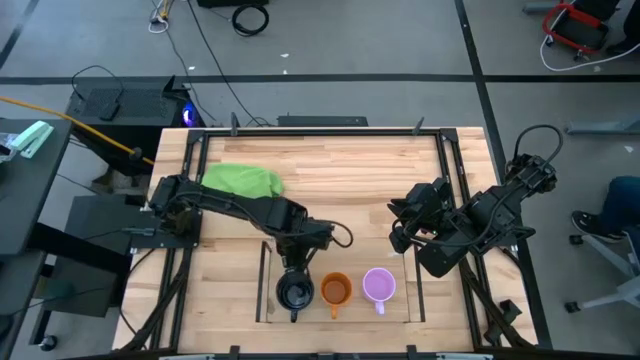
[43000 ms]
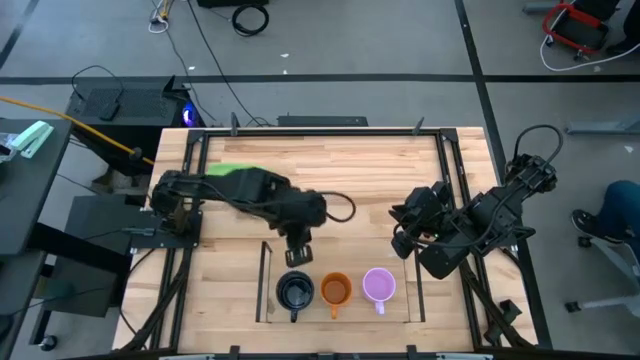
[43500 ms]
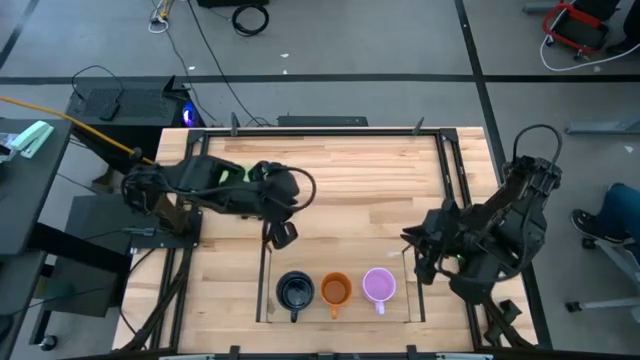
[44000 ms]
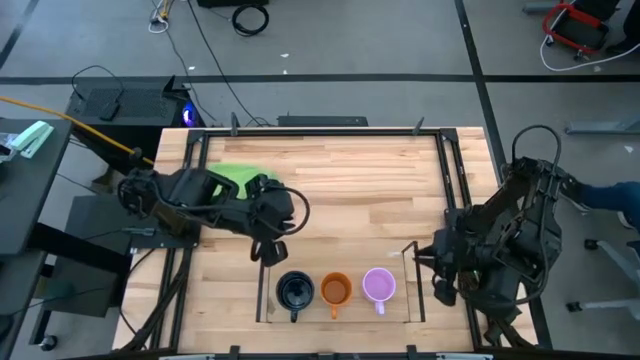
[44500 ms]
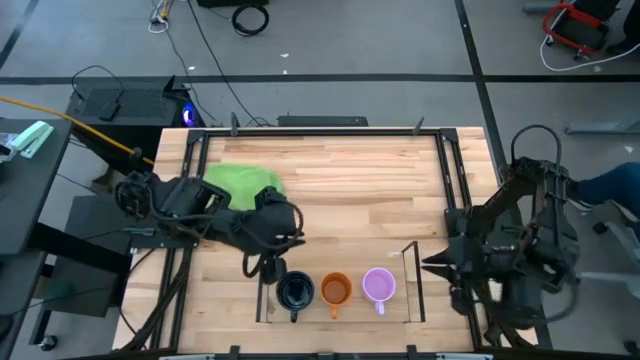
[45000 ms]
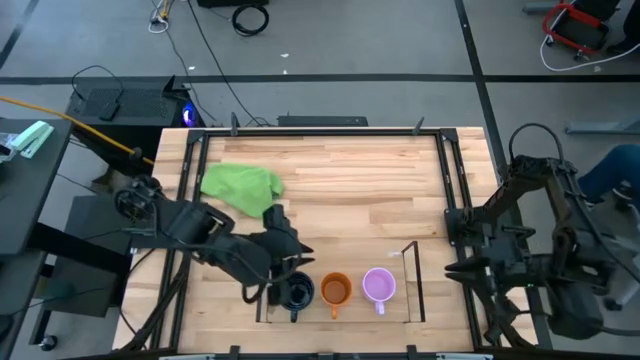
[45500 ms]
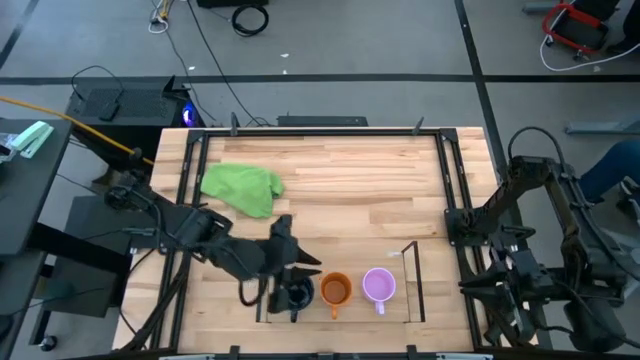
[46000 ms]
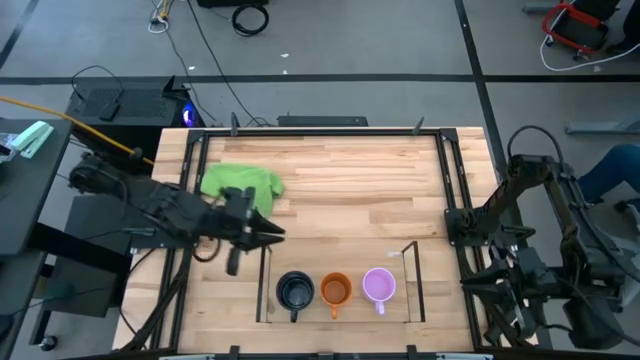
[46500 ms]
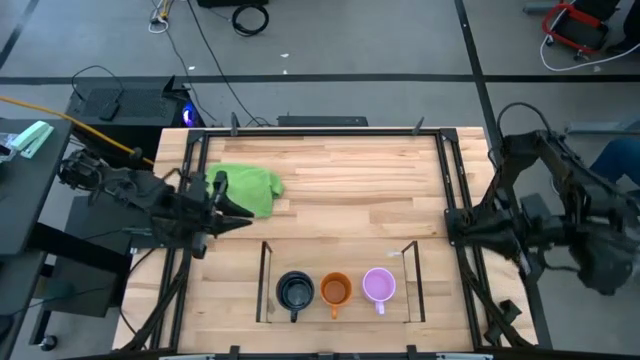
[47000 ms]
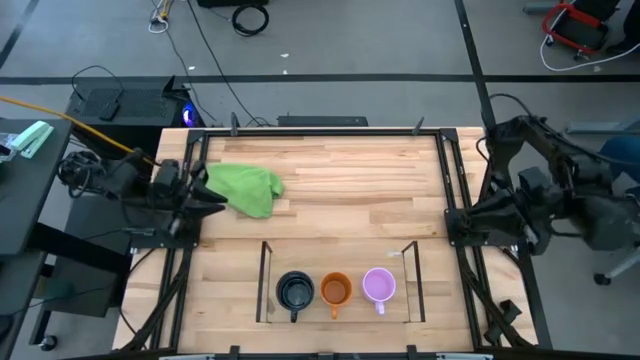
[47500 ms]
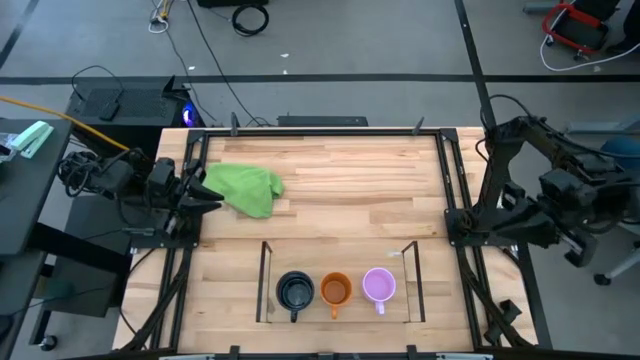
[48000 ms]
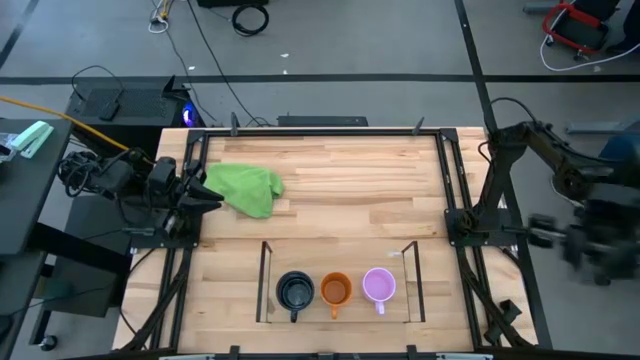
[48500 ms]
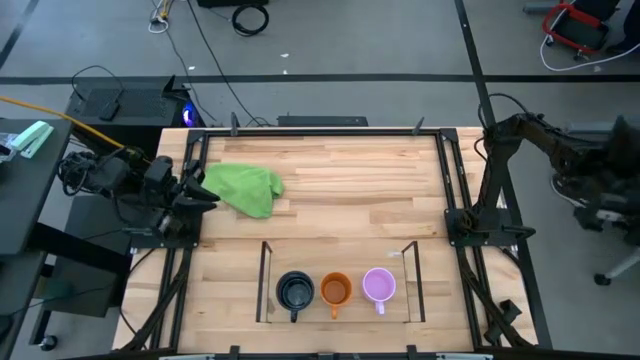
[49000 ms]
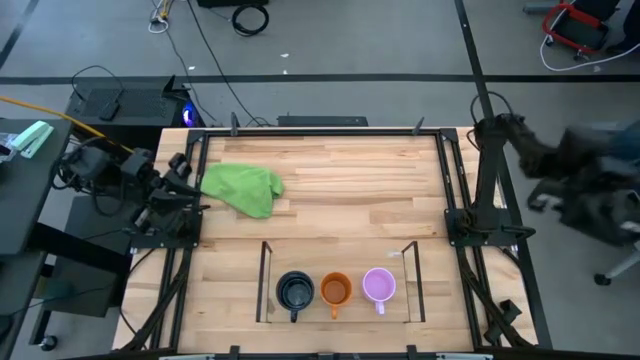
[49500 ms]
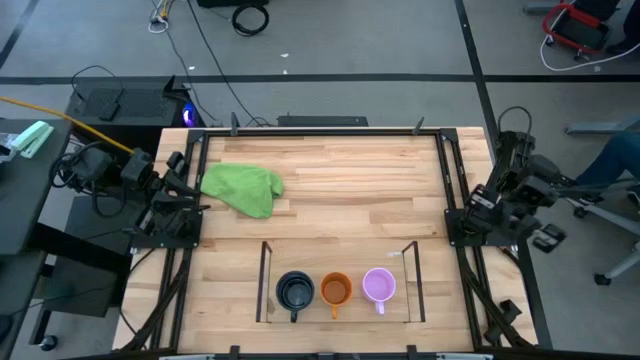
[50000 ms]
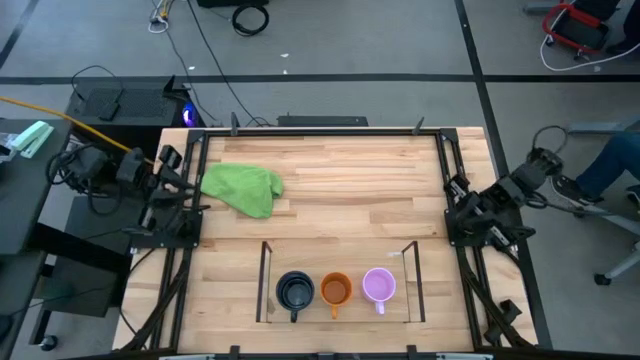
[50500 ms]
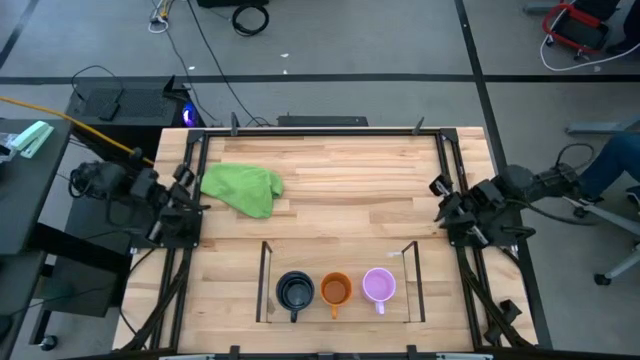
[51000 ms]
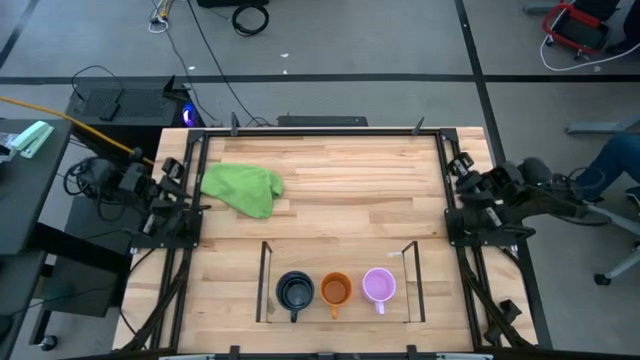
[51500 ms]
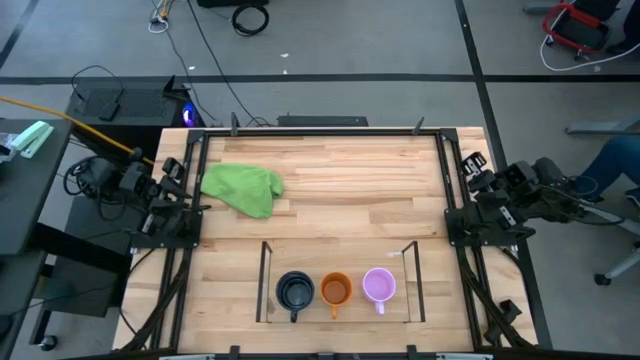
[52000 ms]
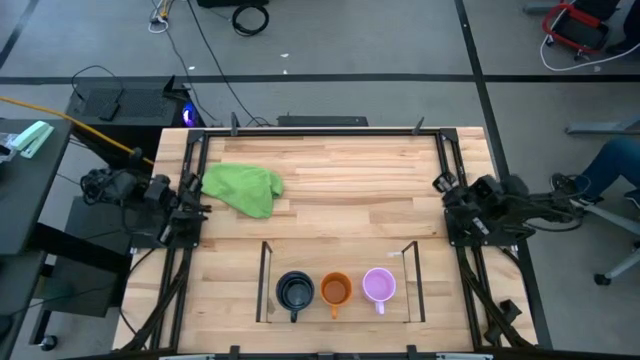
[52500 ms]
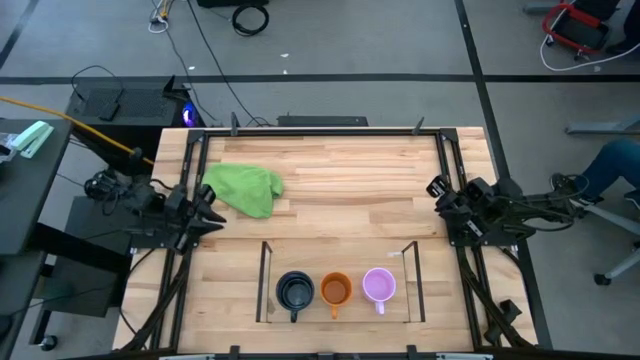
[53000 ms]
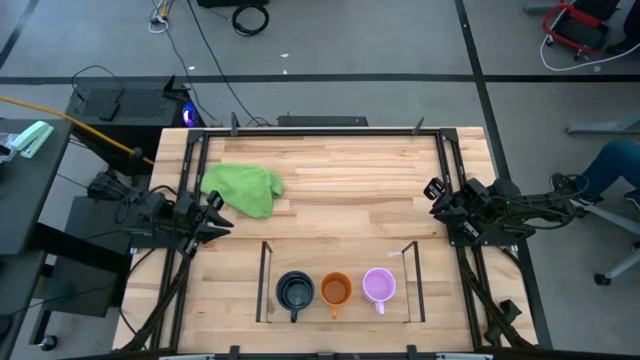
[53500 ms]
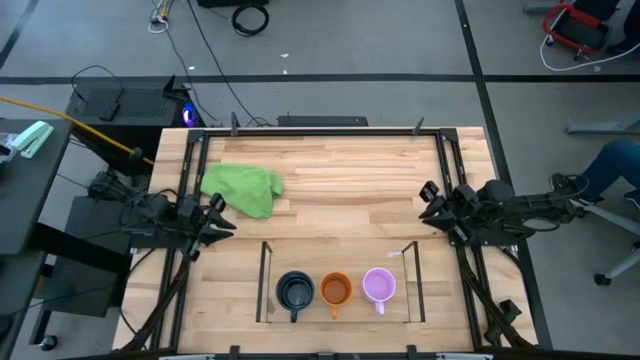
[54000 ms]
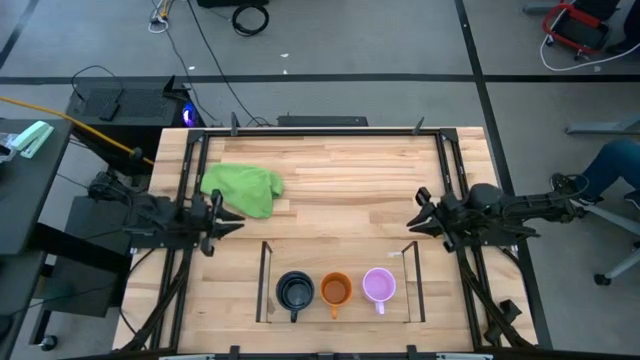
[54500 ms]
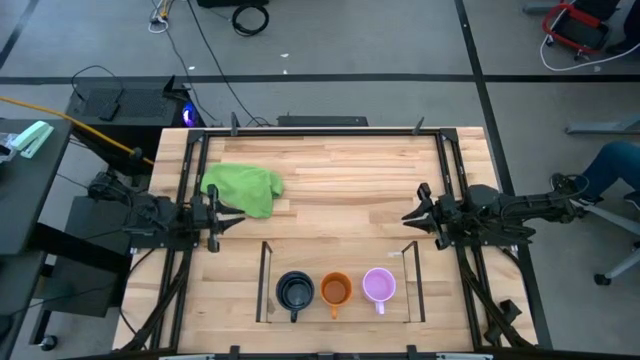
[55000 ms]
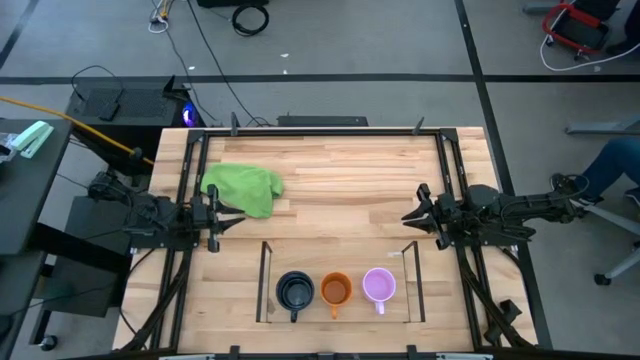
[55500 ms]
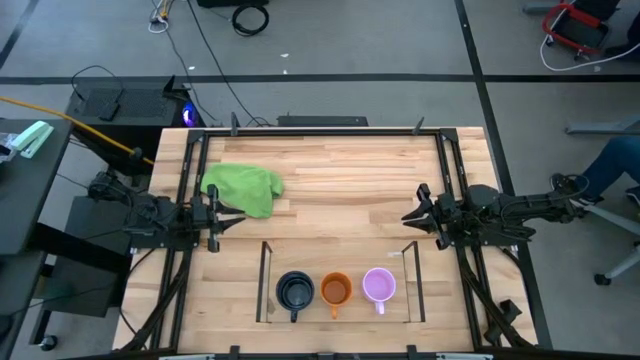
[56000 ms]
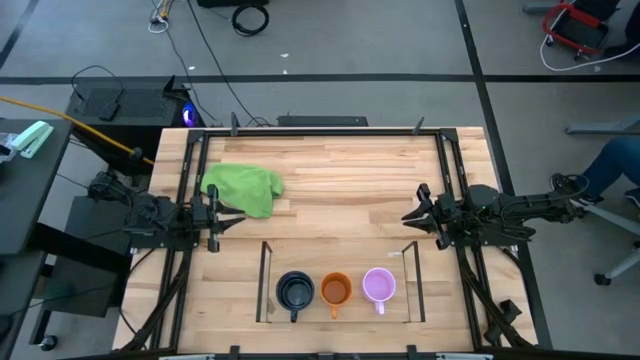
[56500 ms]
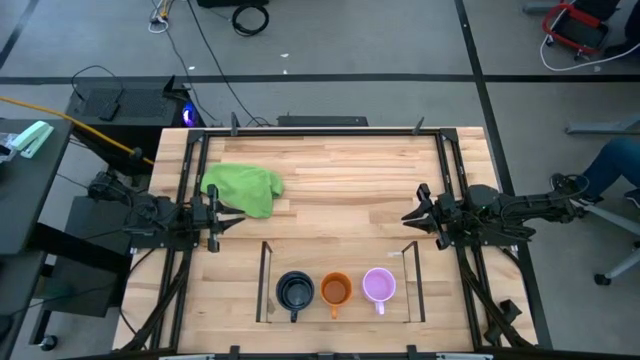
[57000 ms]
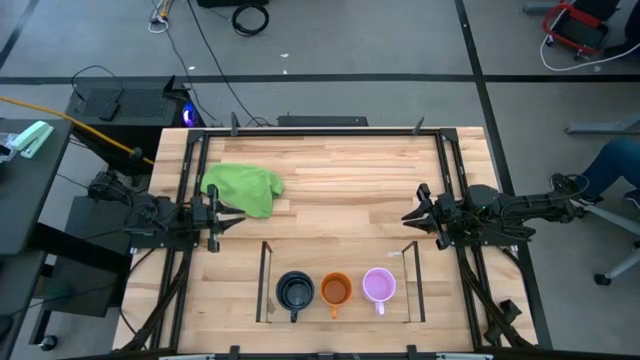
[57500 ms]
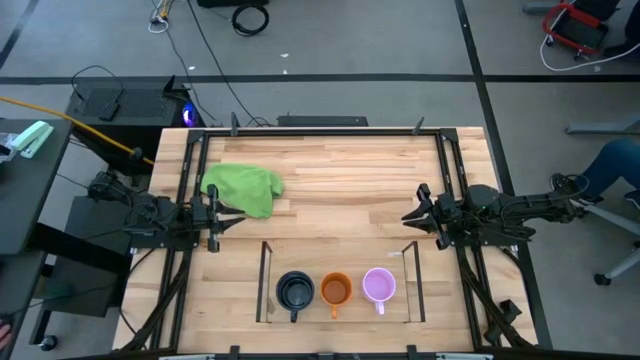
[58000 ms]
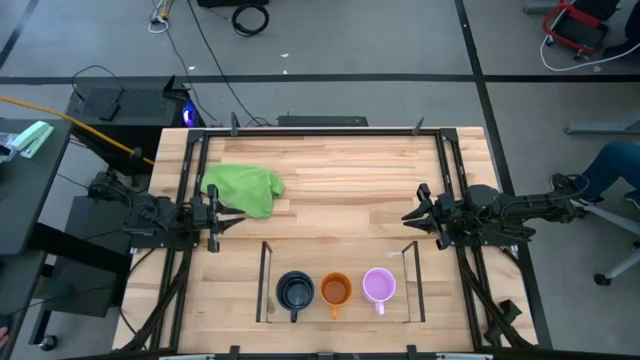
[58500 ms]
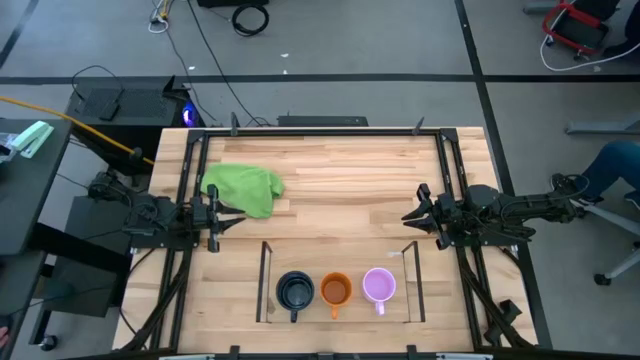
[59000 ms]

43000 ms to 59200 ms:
Task: Stack small to large cups/mugs on shelf
Return to Home Position

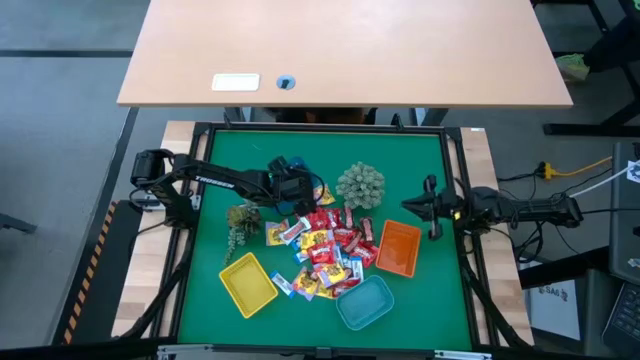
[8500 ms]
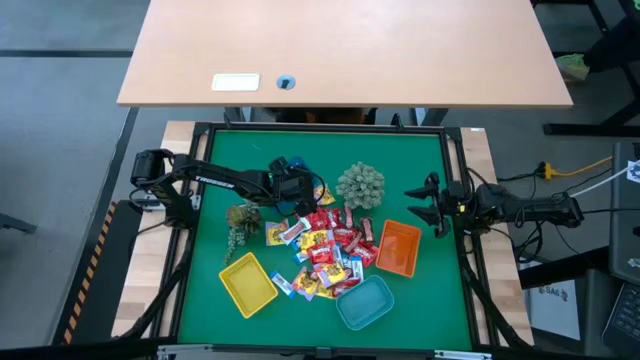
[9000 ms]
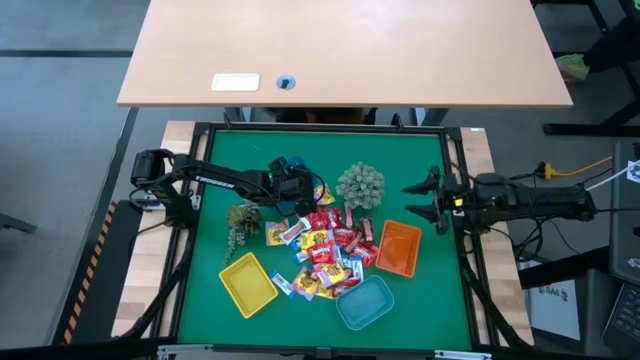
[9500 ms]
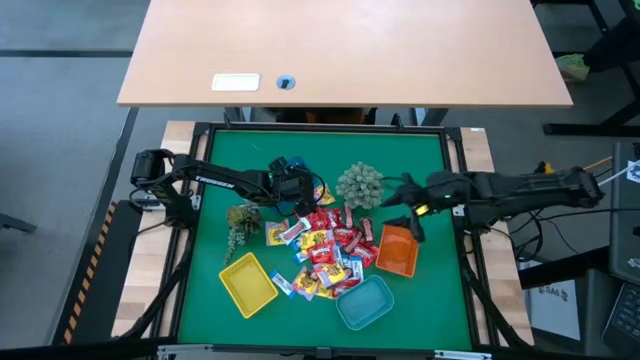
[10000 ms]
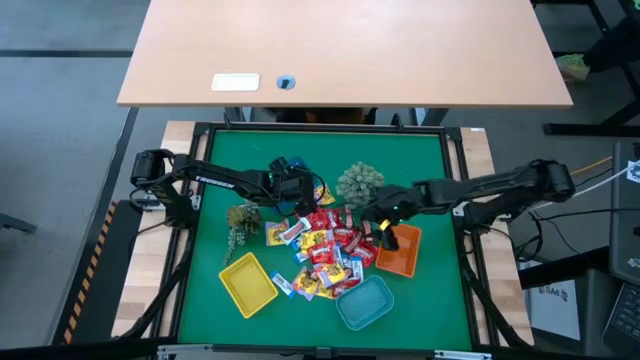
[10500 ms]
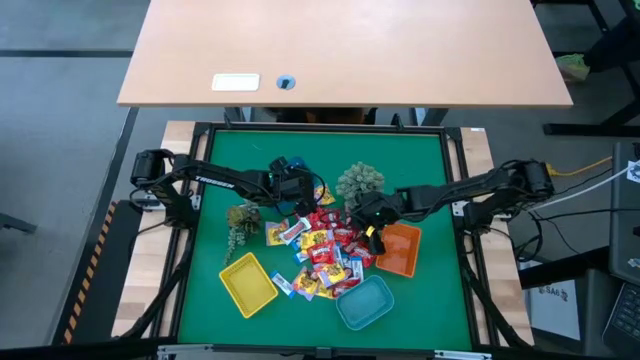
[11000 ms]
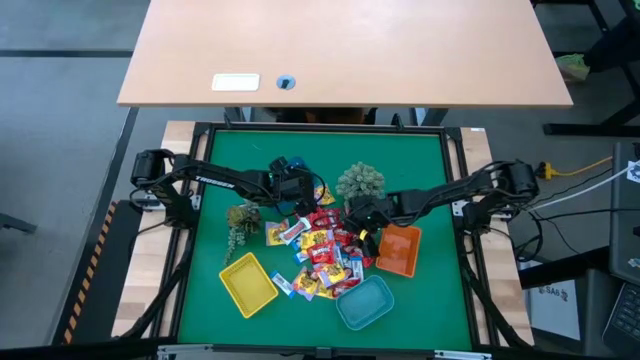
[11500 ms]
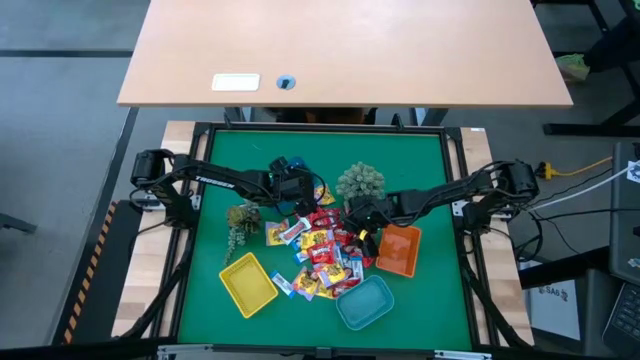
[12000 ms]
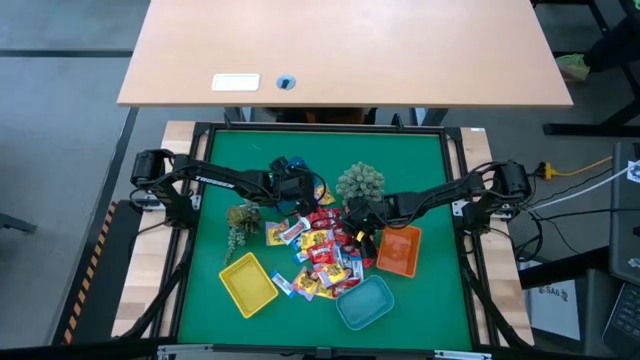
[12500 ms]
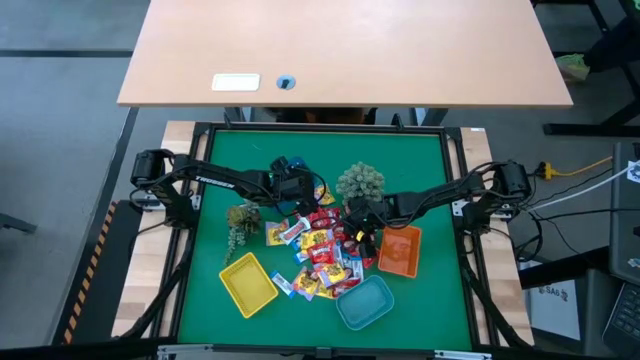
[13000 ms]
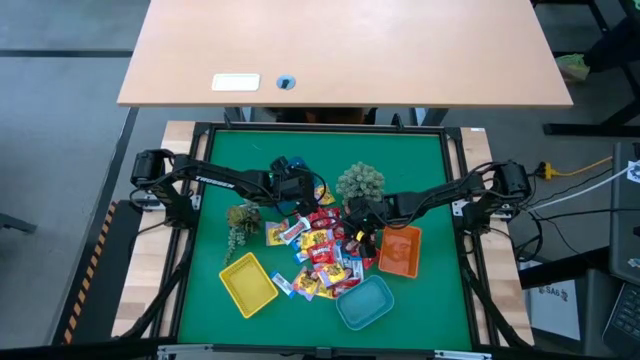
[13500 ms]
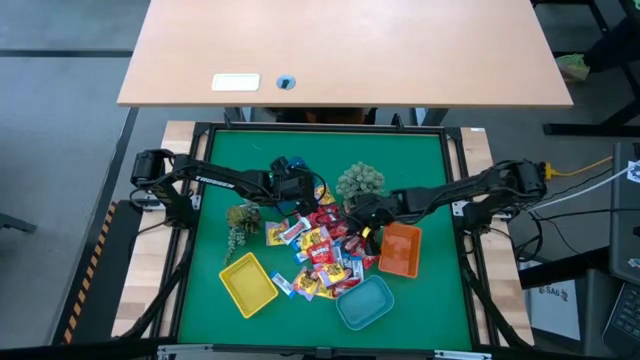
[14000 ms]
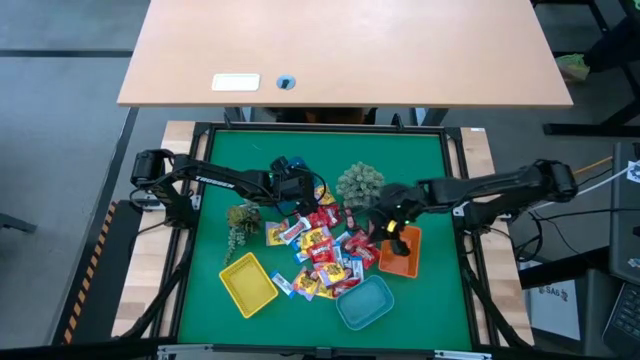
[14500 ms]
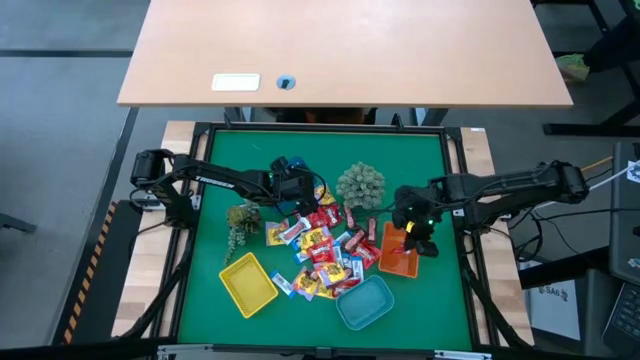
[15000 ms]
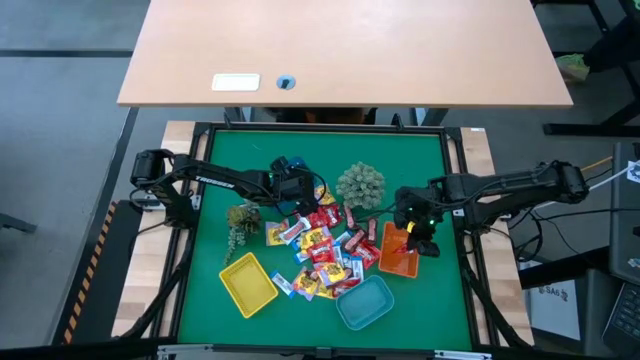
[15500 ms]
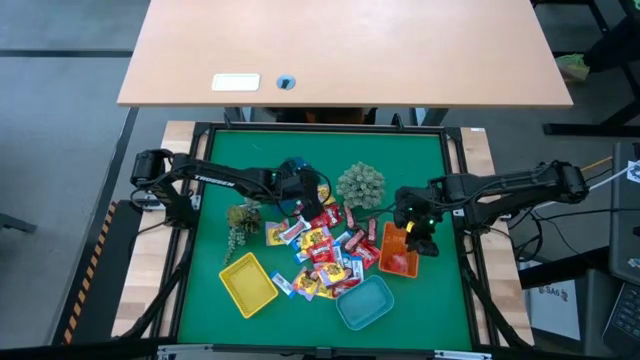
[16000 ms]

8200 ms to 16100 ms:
Task: Sort candy
Put the red candy into the orange bin
